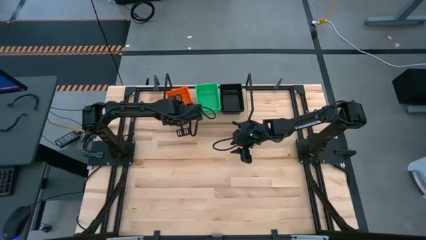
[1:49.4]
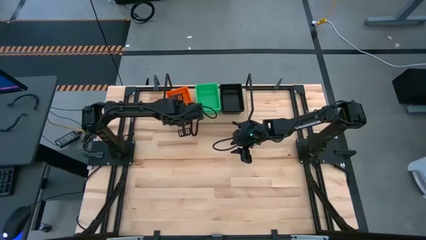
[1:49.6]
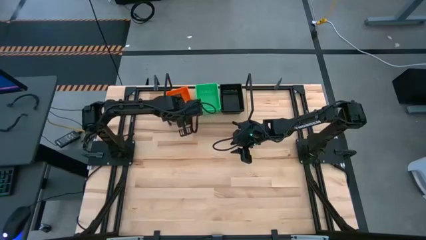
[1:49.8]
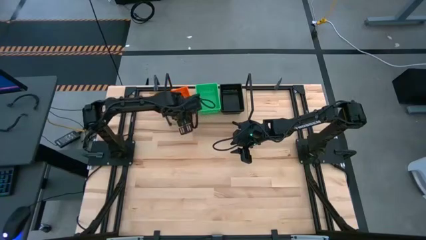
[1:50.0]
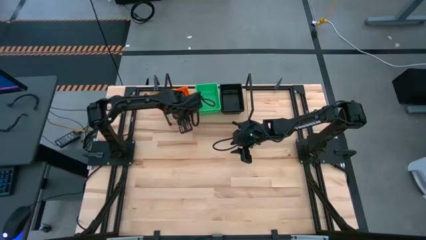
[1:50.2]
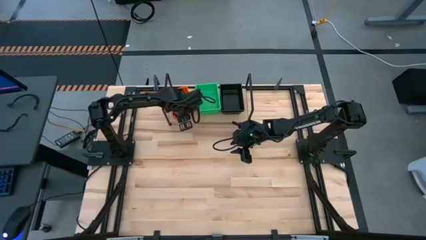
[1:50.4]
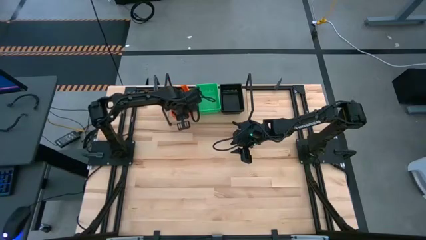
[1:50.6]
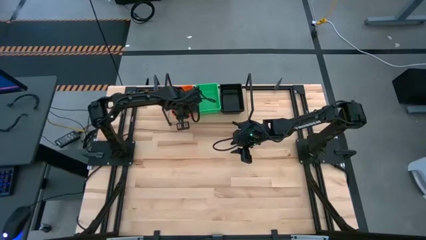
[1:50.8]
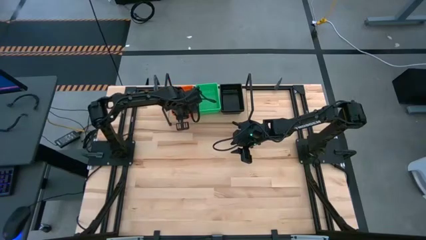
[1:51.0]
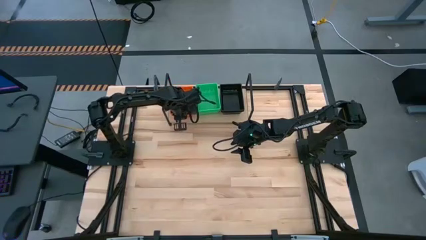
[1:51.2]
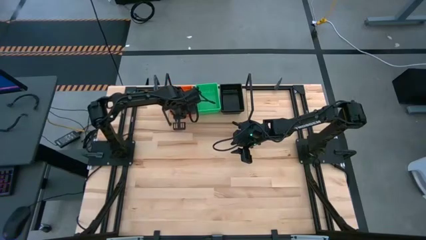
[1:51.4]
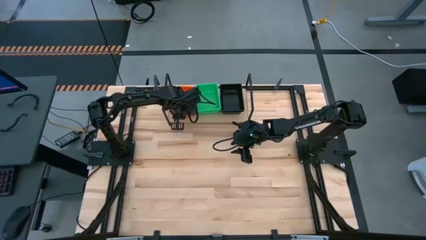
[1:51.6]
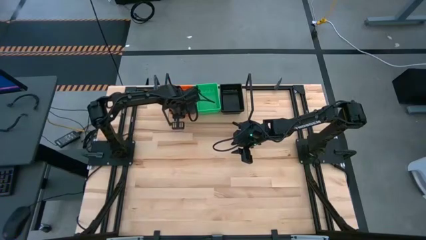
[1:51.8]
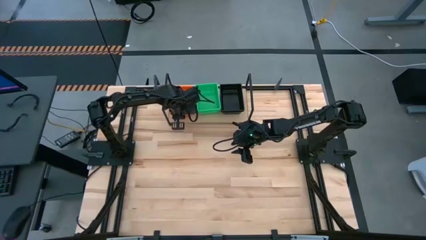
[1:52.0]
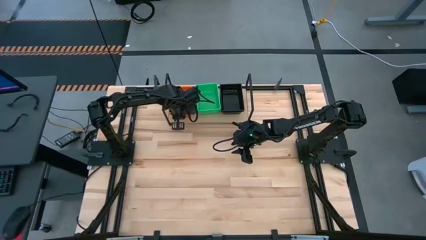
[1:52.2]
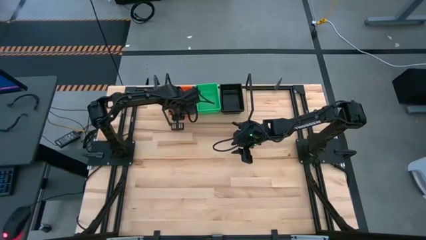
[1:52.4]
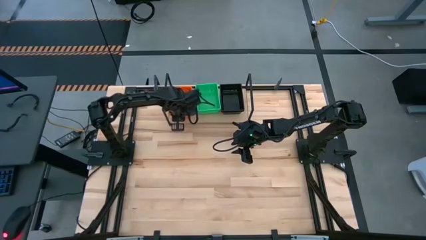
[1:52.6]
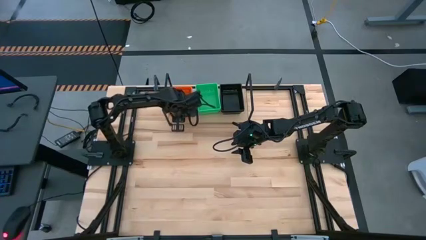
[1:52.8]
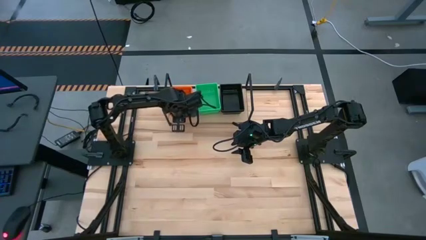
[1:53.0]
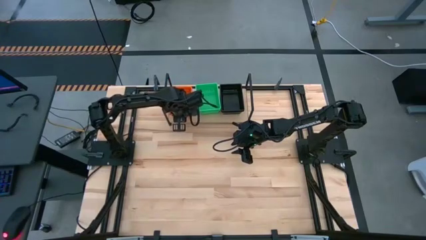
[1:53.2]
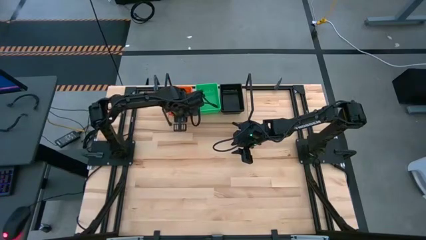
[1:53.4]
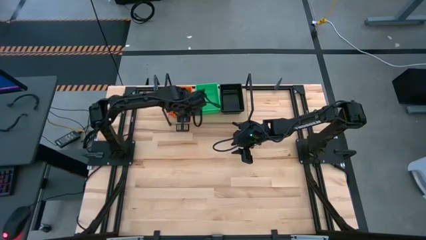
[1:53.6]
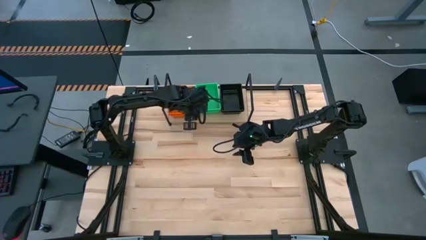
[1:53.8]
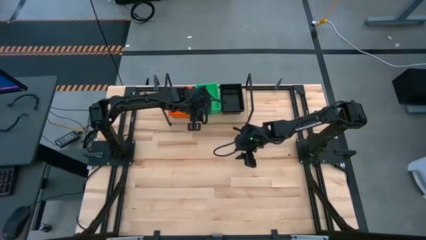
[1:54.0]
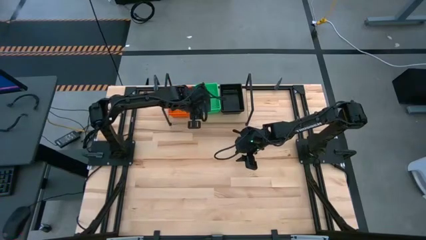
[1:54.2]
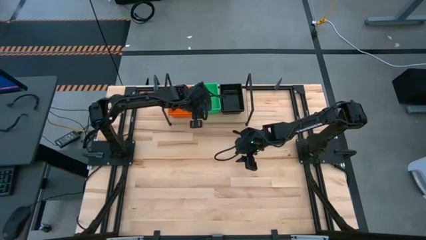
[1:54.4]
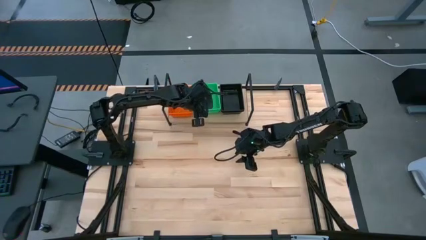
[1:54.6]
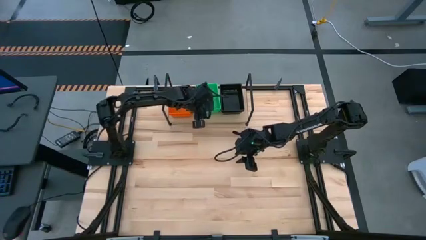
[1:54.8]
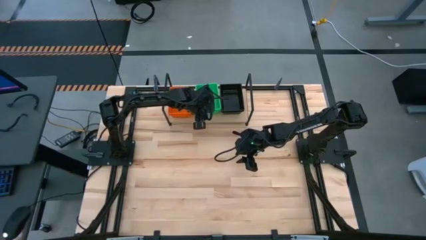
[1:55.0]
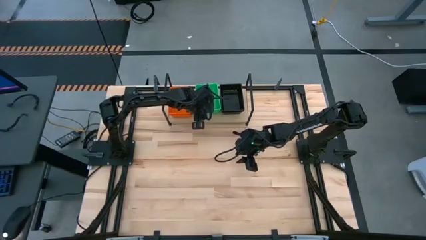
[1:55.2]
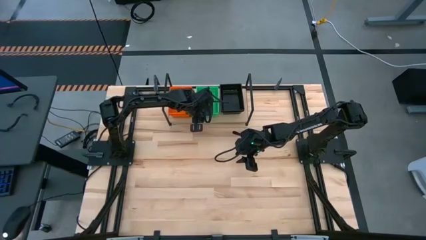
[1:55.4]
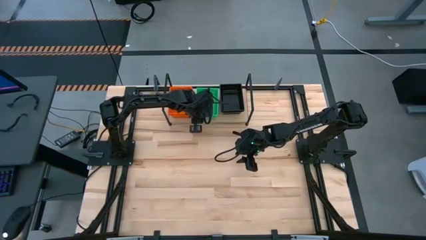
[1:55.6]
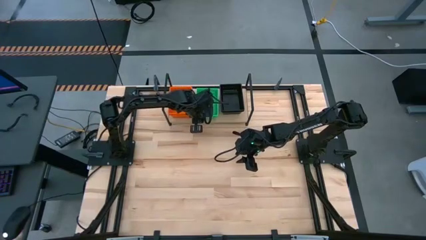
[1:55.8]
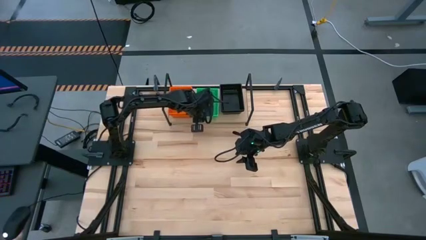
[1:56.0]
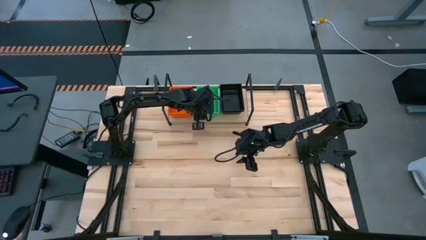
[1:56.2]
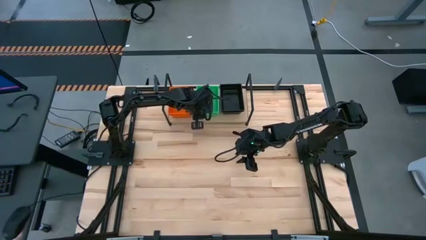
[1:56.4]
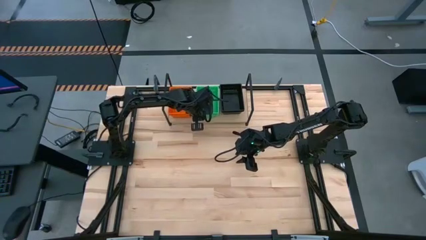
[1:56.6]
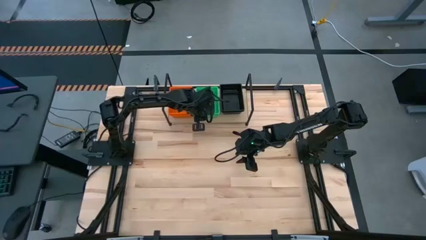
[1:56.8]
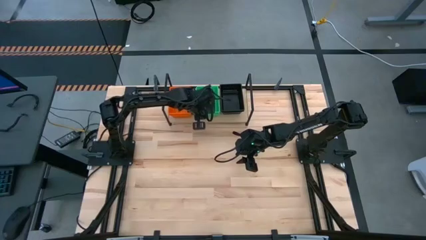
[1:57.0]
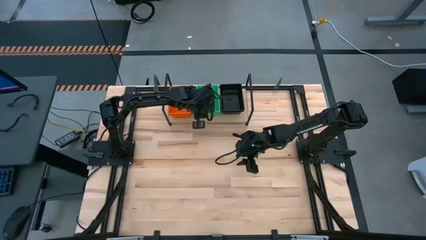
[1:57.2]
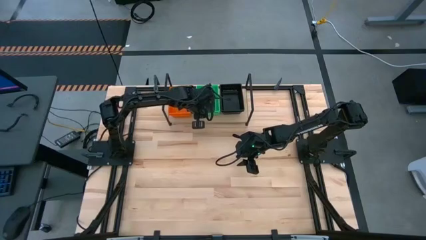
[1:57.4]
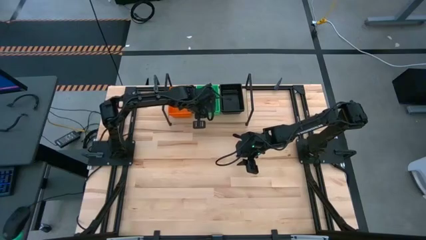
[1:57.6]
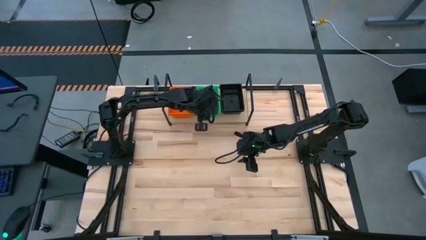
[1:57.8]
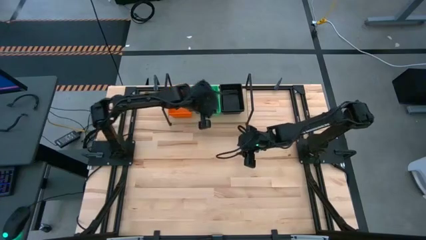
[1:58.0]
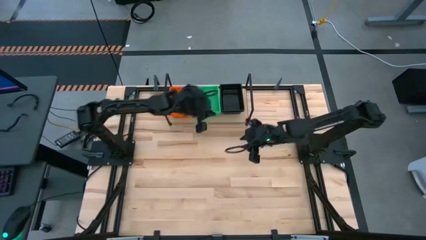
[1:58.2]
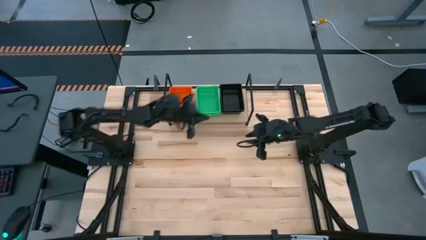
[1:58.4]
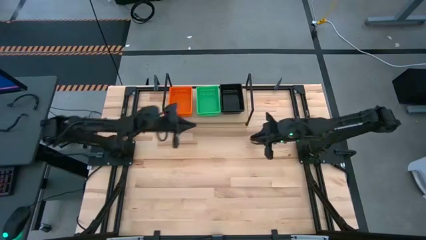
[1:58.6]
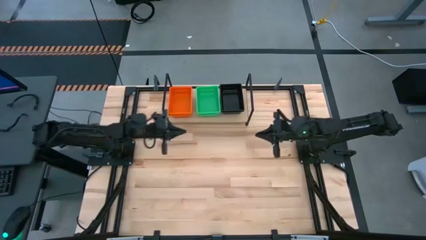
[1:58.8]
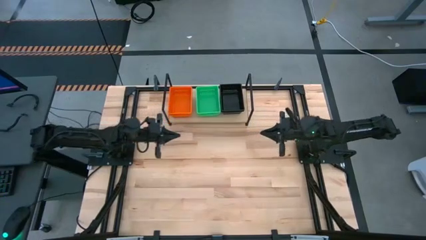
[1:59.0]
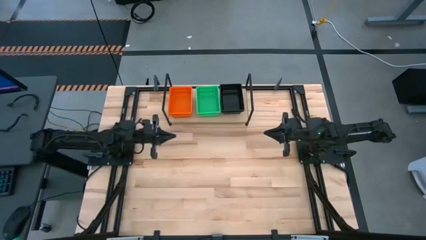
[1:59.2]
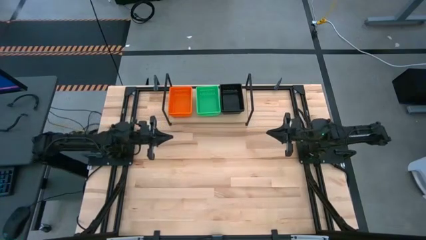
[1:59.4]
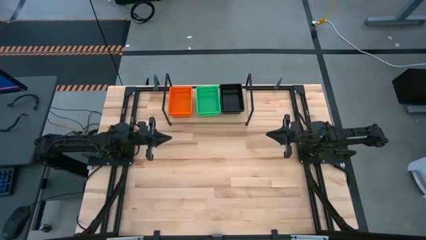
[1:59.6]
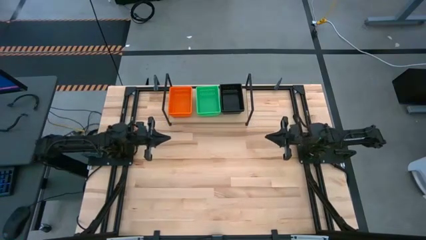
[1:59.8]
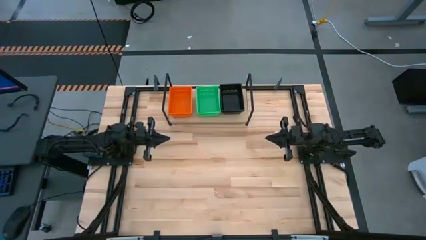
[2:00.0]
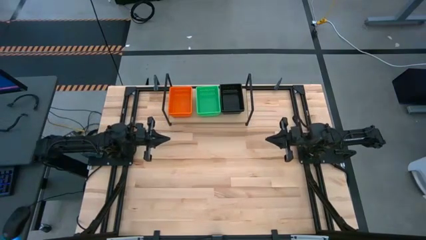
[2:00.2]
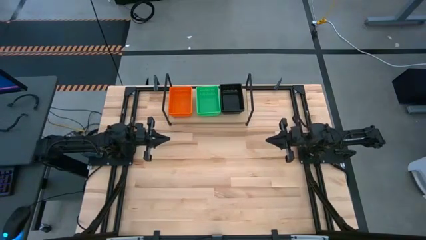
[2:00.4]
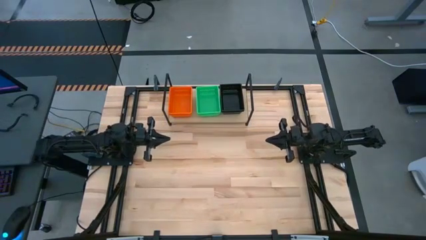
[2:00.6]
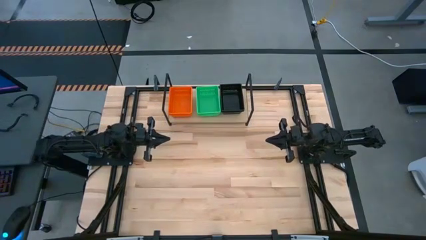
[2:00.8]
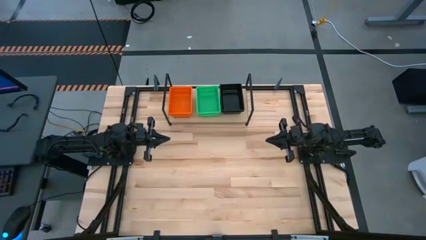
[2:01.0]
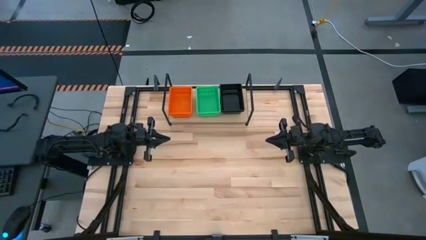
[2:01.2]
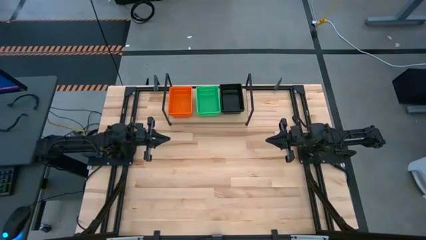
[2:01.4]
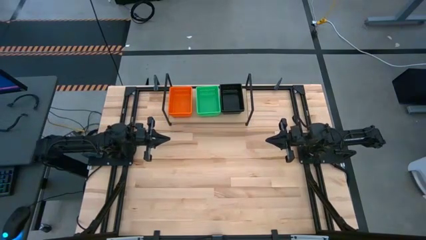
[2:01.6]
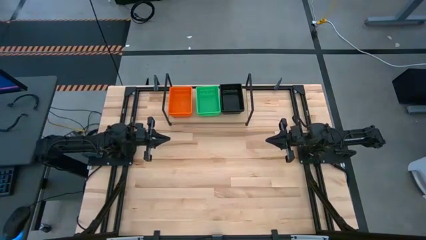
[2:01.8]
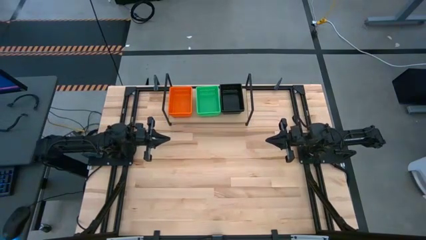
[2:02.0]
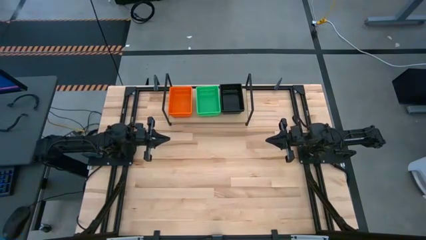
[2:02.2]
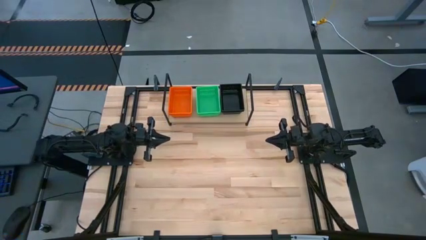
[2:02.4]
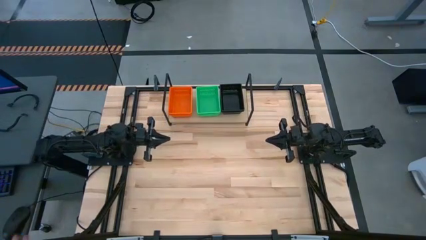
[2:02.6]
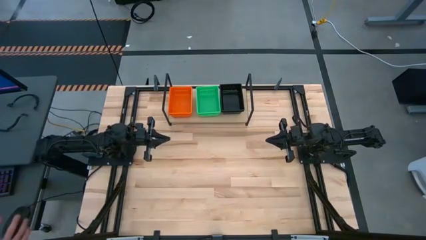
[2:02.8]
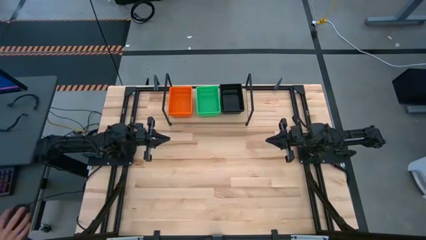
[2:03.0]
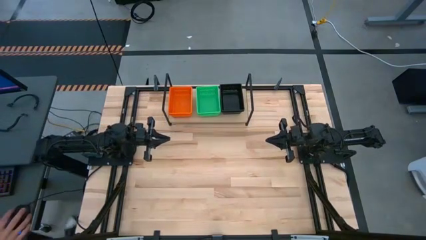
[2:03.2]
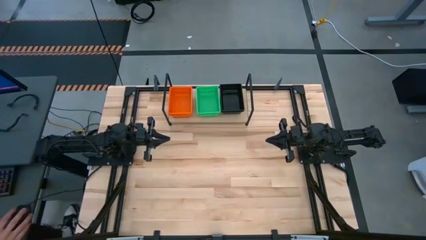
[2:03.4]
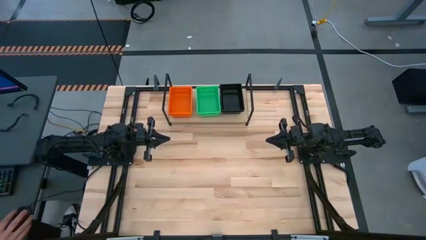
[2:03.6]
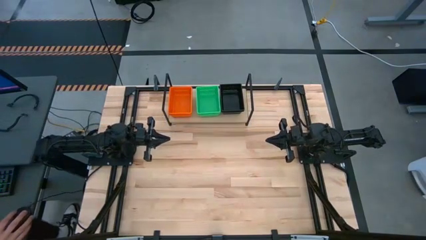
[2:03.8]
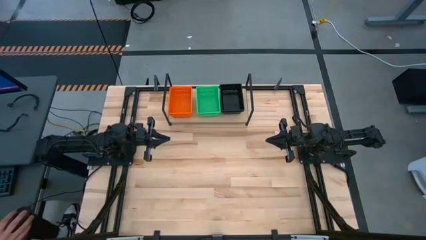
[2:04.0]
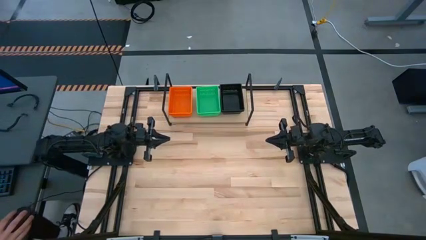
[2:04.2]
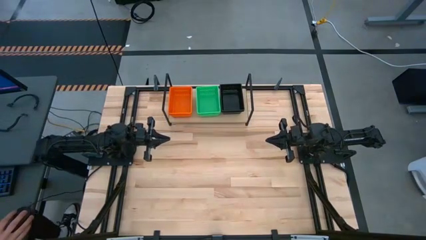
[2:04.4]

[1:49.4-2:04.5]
Task: Stack baskets on shelf by color
Return to Home Position
